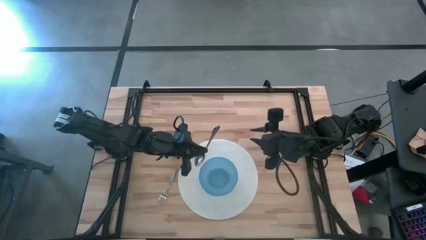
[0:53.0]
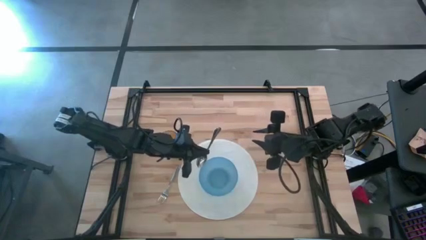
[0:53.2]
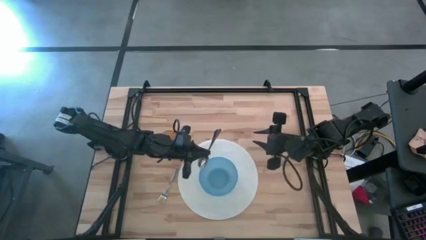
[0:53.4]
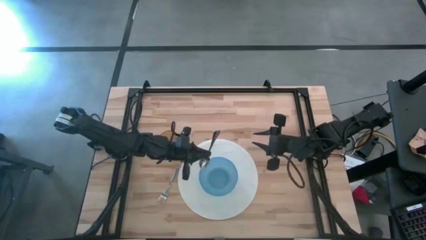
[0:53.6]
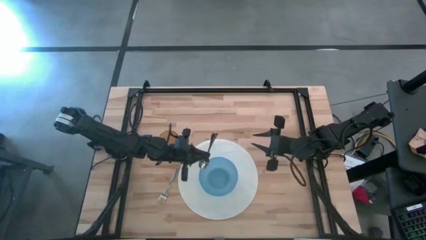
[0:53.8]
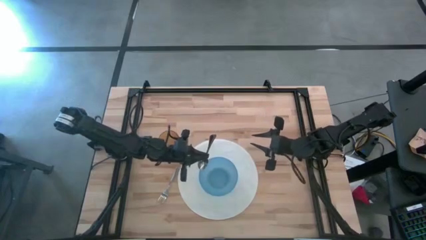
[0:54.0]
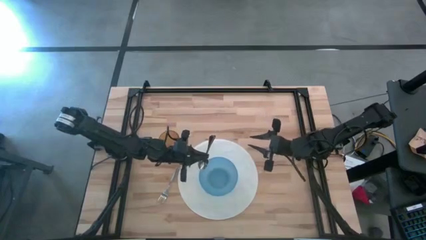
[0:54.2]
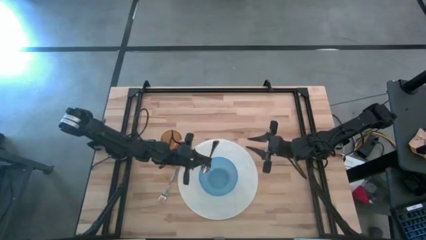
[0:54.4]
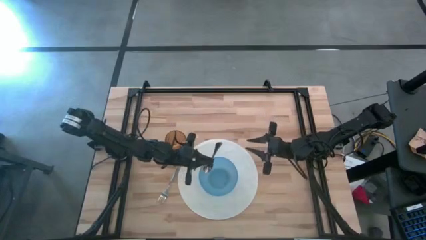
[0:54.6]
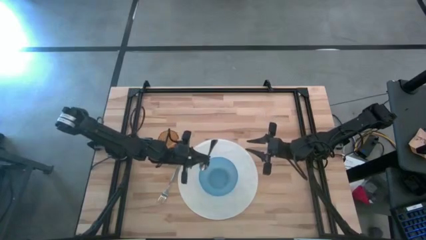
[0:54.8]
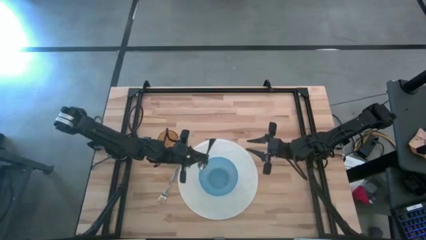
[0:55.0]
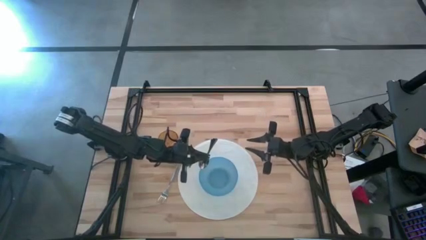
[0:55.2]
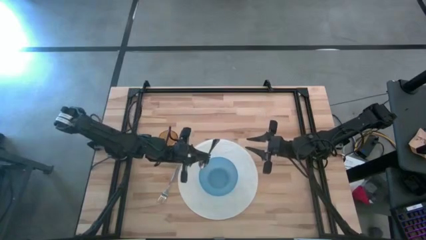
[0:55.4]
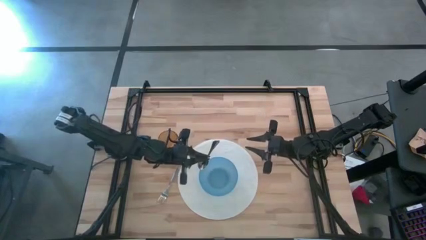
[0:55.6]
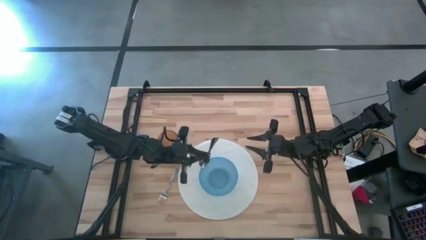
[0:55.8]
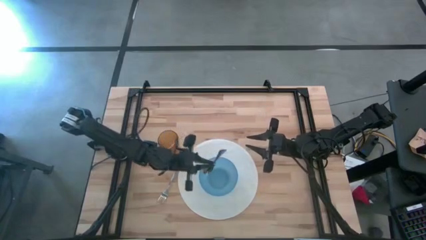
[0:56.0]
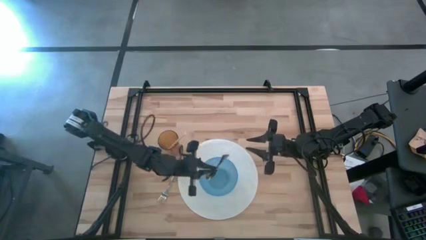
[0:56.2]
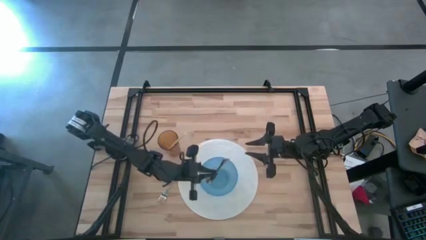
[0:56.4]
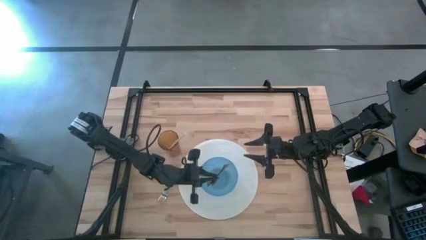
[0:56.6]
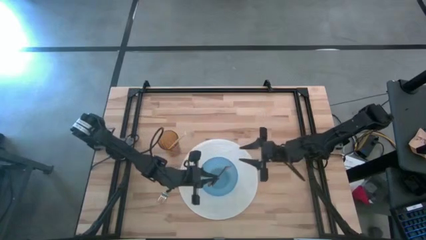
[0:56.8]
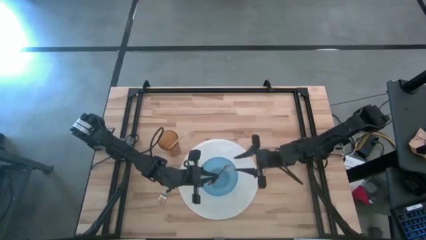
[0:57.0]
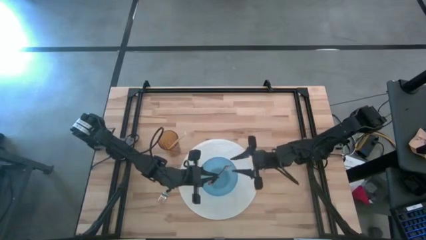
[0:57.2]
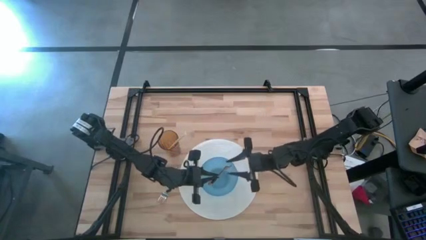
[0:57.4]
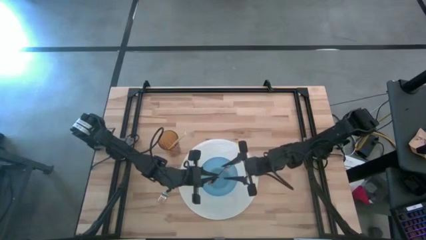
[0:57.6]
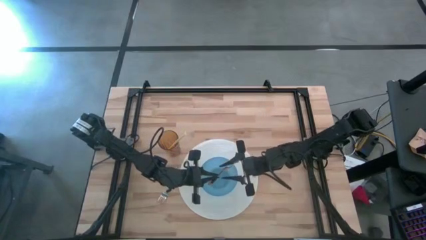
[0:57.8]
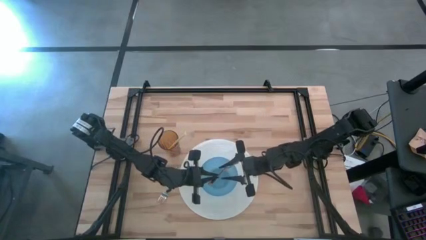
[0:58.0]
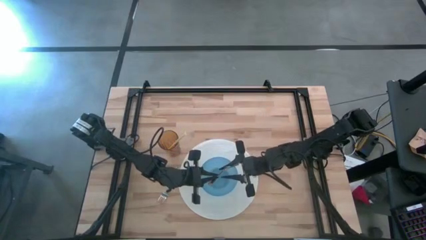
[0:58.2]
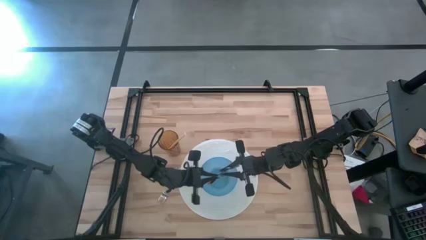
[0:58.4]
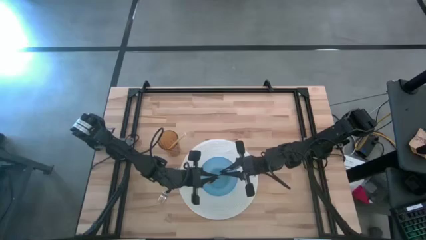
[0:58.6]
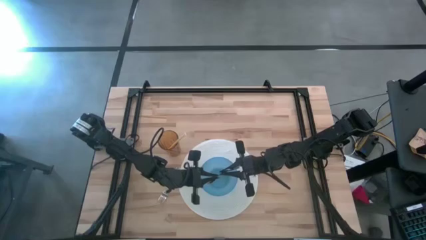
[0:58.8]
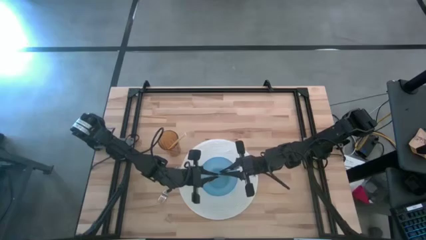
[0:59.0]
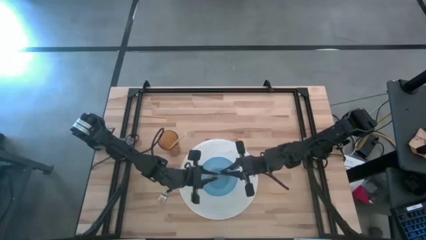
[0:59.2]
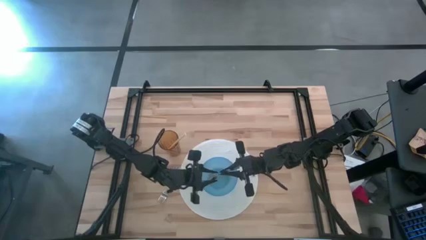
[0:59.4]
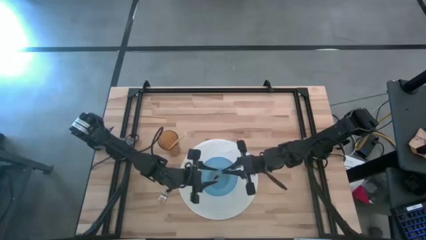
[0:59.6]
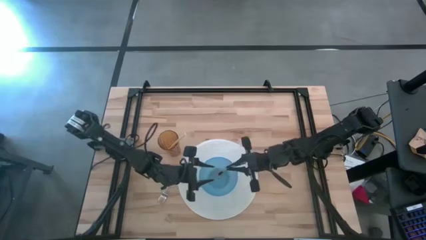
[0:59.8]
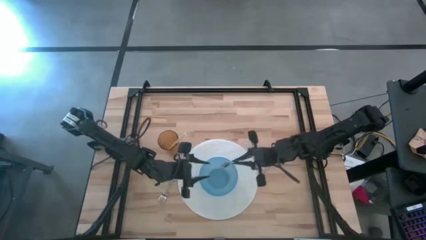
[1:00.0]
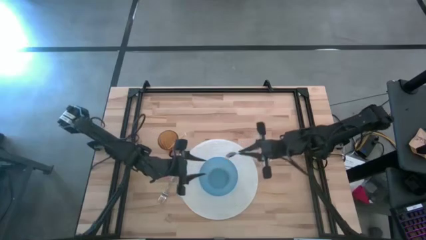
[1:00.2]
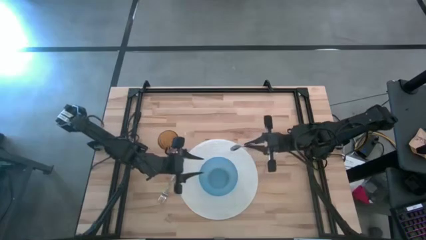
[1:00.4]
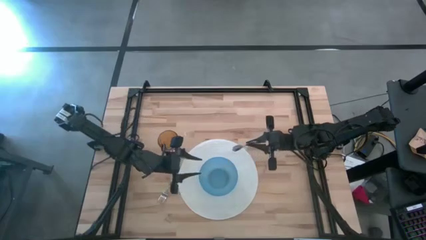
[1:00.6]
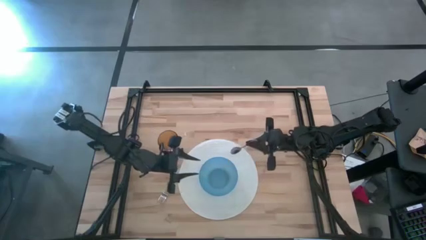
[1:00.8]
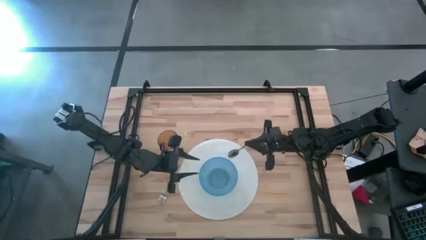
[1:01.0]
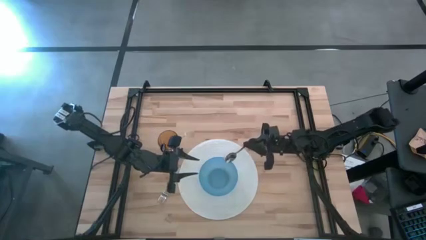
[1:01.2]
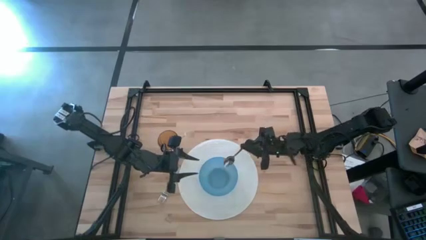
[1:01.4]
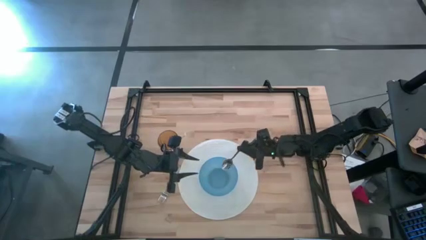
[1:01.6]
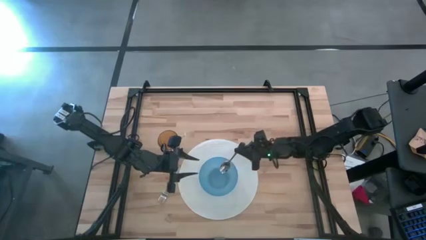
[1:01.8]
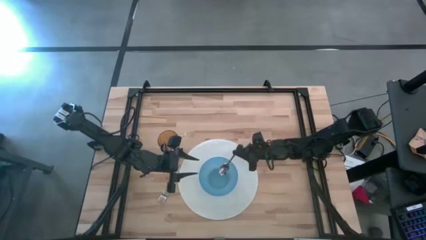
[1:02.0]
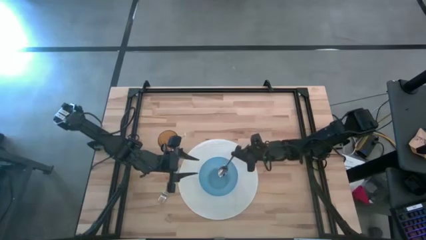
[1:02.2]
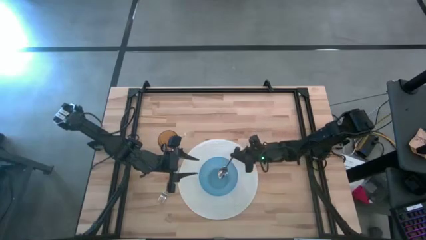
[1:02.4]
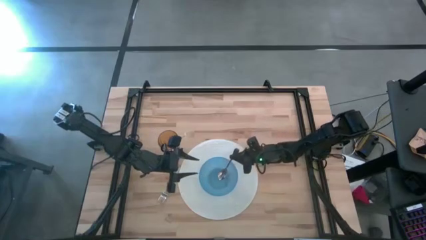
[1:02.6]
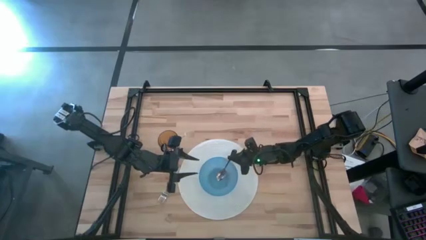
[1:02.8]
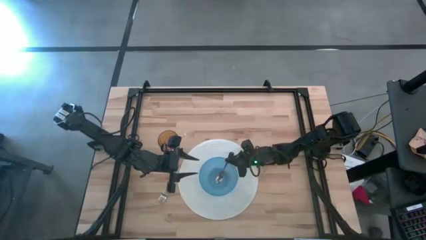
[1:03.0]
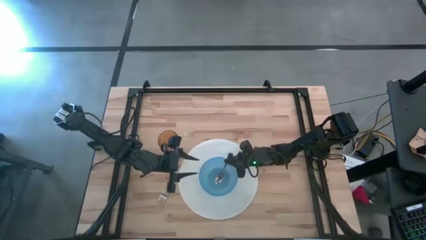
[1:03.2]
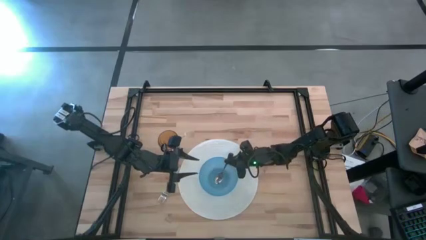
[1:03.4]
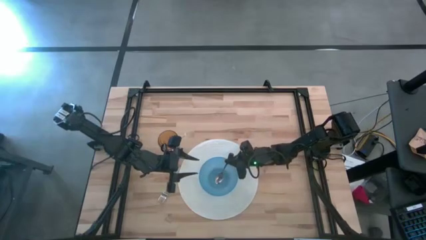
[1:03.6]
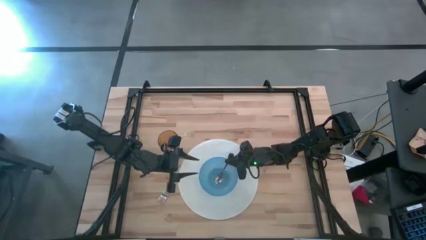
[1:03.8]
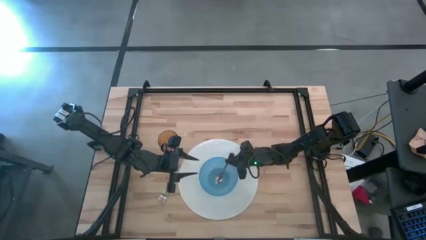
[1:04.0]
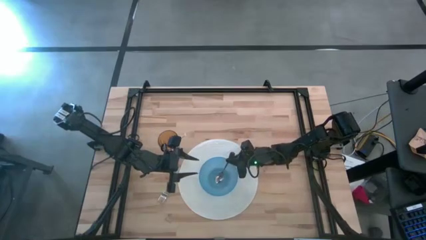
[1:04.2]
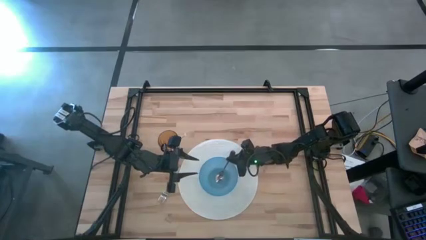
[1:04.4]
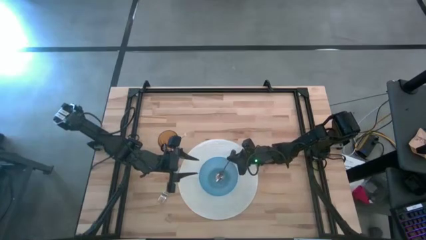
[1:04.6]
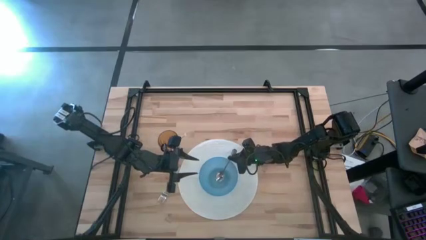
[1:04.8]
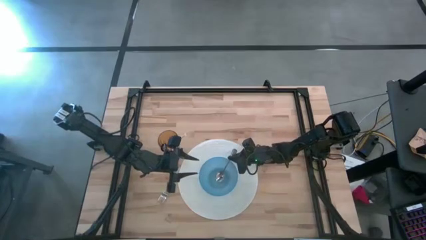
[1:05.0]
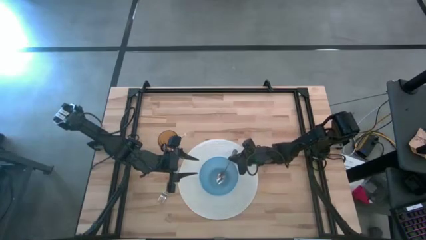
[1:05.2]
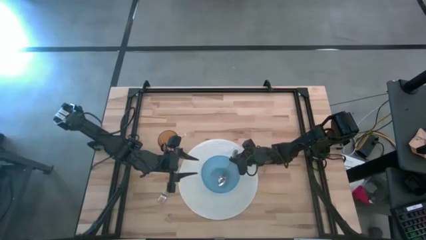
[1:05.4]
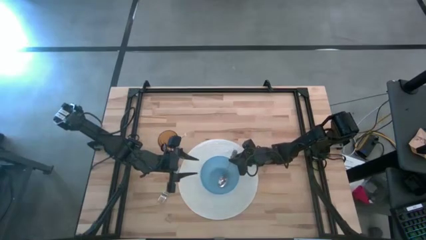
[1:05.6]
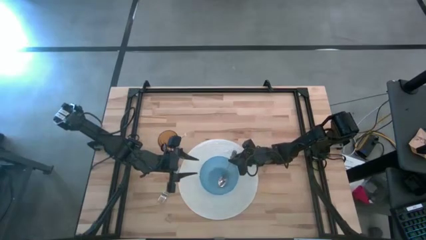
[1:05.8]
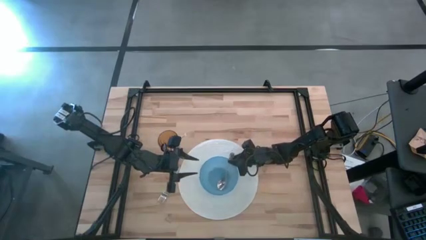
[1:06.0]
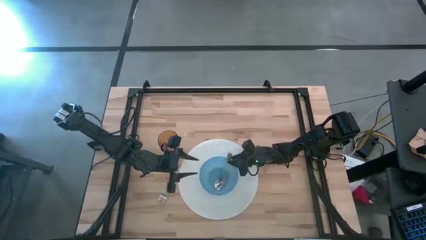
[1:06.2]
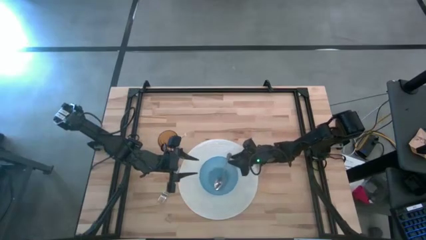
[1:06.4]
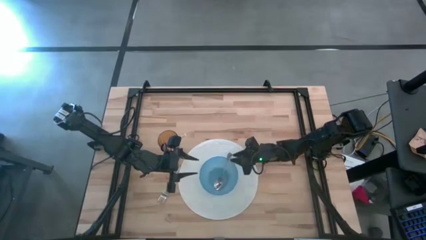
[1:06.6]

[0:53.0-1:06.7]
Task: Pick & Place Utensil
Put the spoon into the blue bowl
